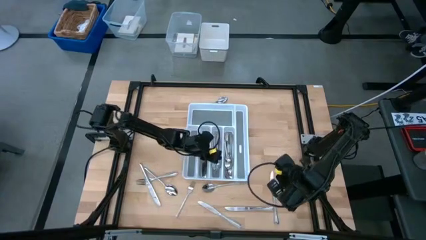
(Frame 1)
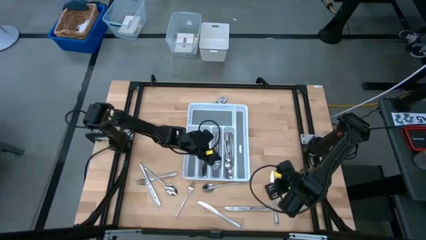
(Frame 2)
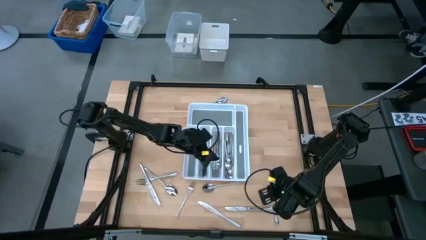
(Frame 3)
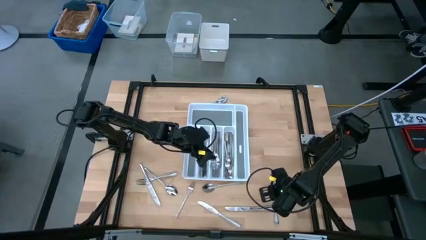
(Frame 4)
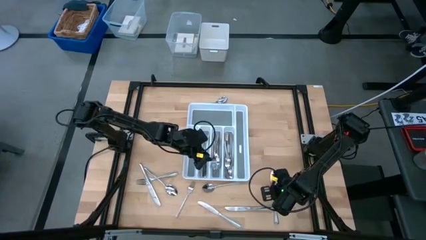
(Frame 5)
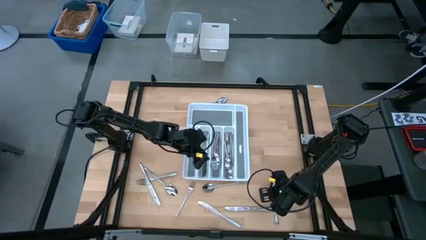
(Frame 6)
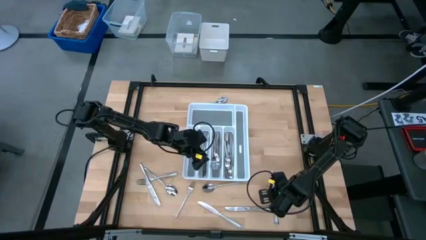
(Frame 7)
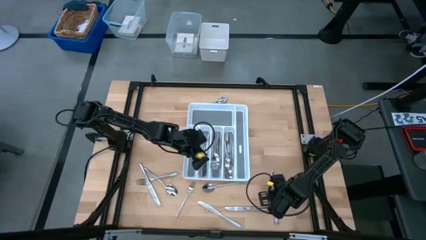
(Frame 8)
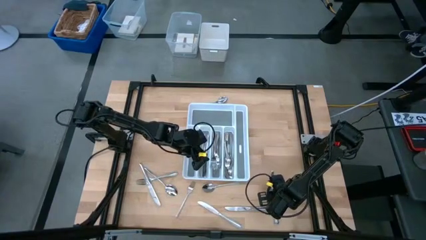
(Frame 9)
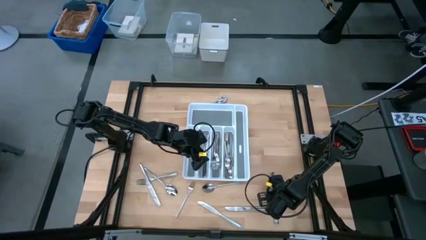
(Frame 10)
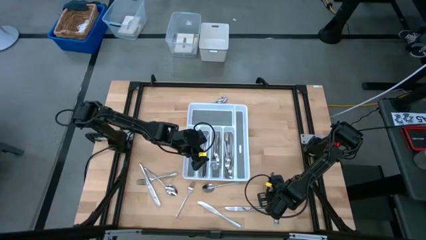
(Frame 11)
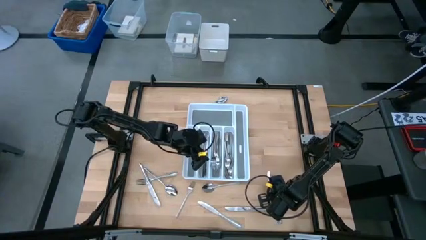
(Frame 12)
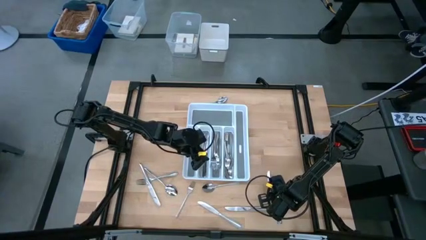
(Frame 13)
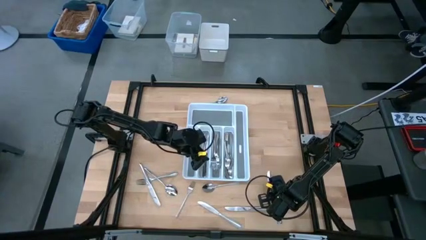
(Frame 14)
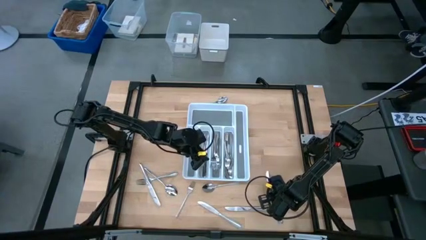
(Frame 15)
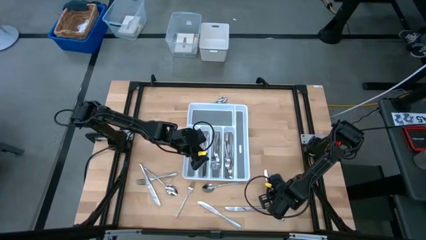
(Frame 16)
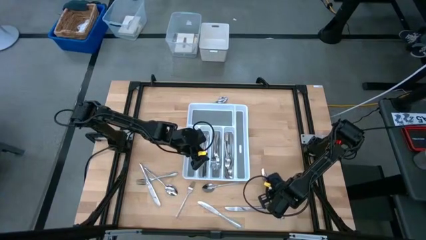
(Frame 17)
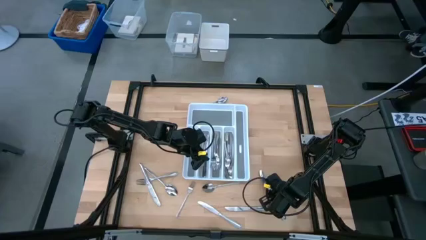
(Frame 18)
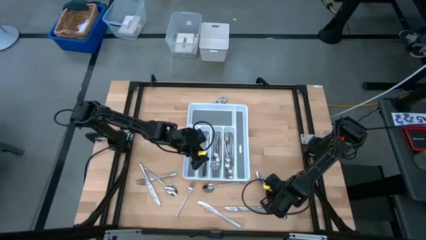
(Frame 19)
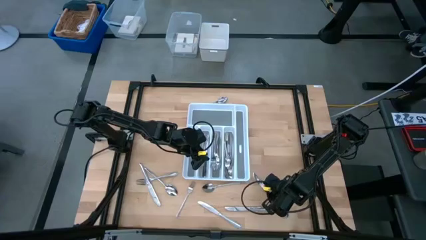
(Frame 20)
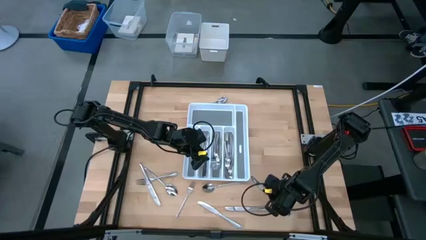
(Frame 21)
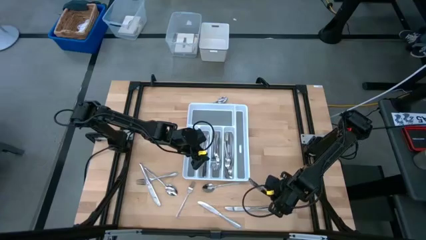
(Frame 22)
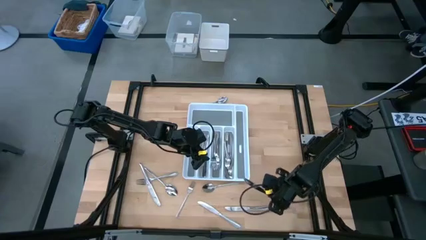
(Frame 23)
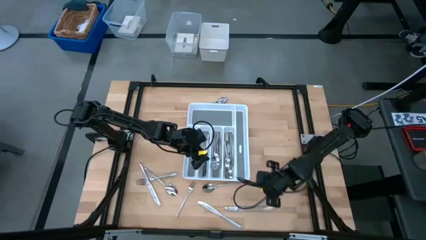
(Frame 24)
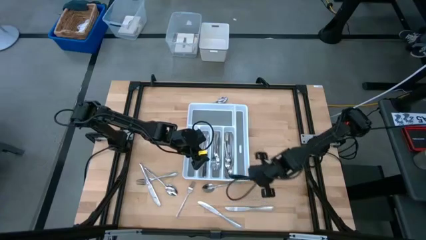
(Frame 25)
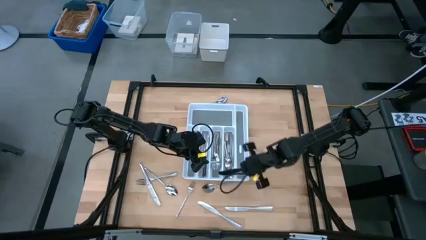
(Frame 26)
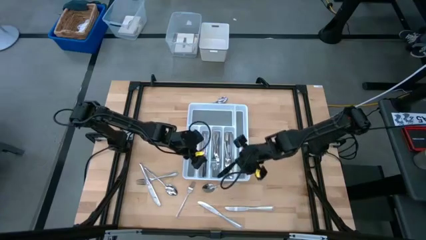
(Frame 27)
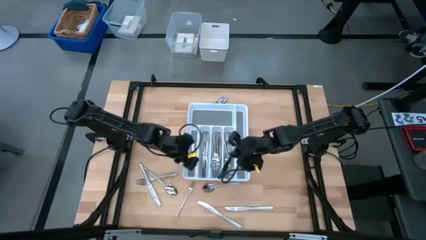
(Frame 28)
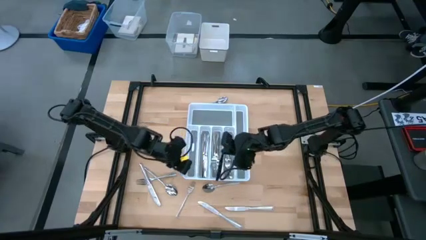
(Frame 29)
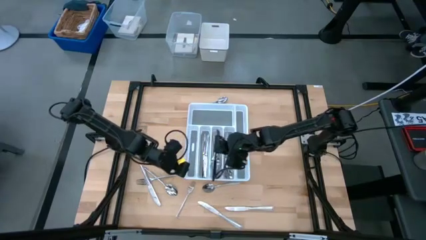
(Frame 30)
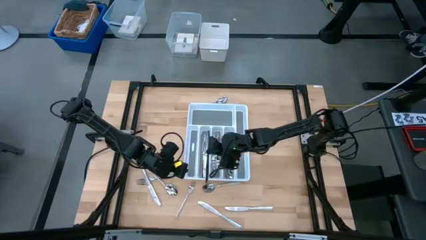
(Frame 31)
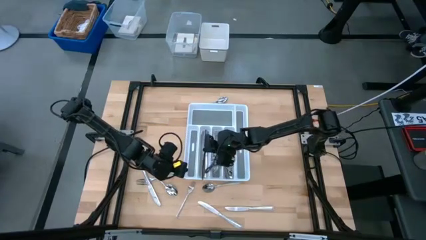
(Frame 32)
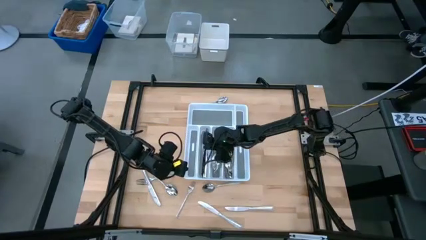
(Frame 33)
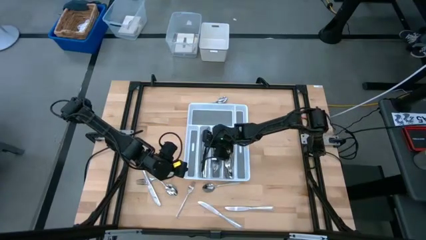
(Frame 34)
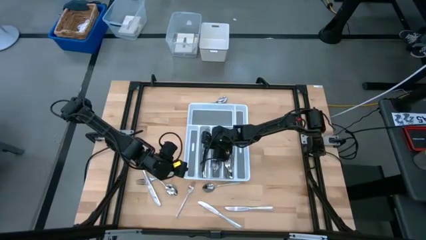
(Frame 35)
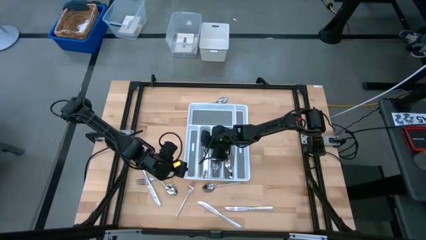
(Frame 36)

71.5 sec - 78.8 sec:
Task: Sort silverware
Put the silver table knife into the white cutlery tray

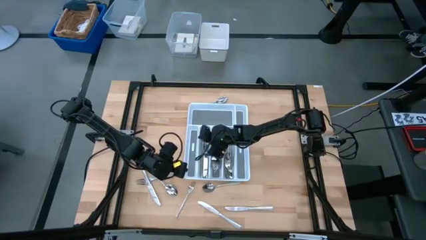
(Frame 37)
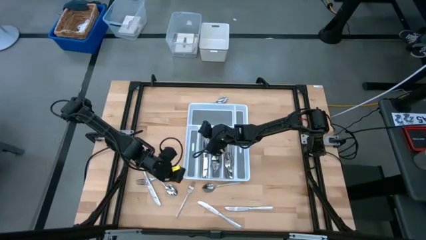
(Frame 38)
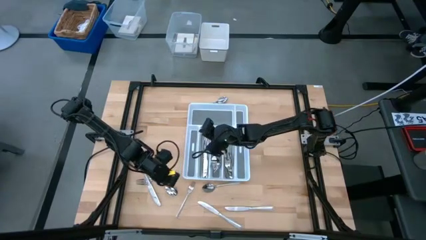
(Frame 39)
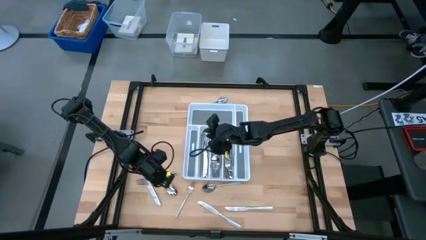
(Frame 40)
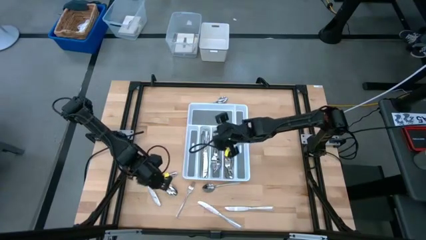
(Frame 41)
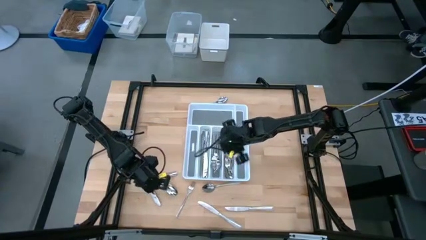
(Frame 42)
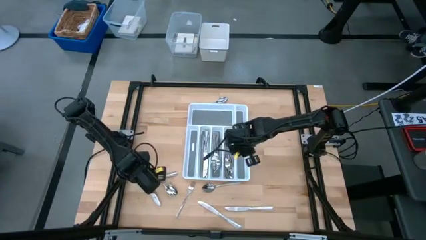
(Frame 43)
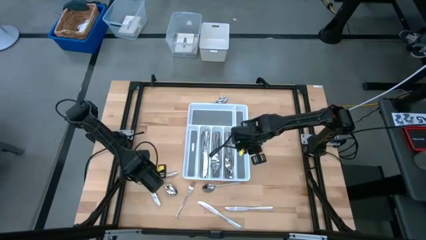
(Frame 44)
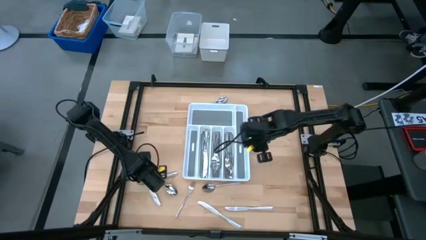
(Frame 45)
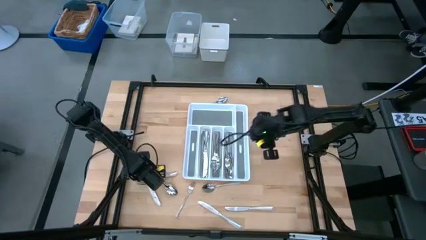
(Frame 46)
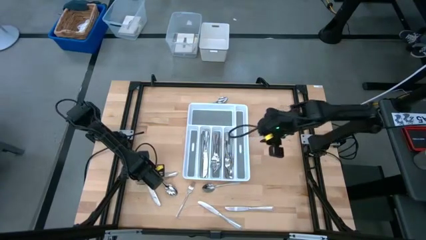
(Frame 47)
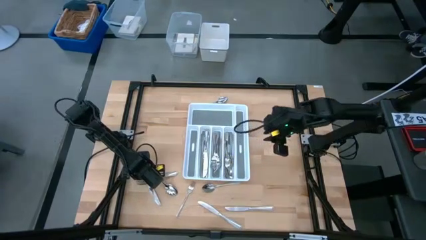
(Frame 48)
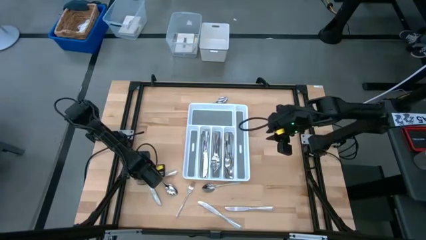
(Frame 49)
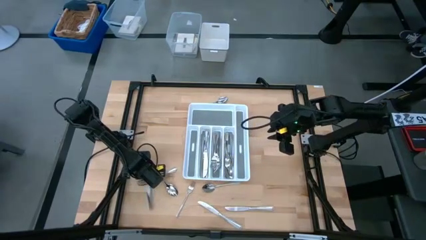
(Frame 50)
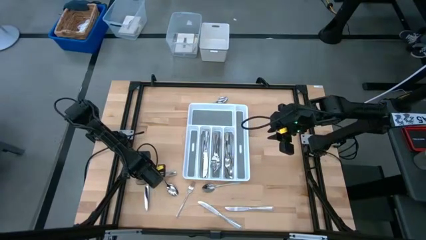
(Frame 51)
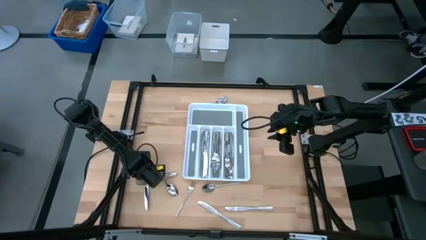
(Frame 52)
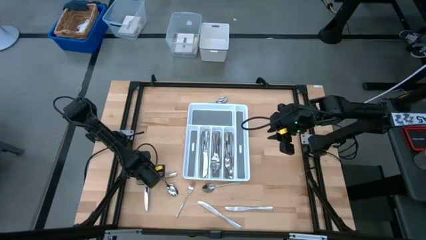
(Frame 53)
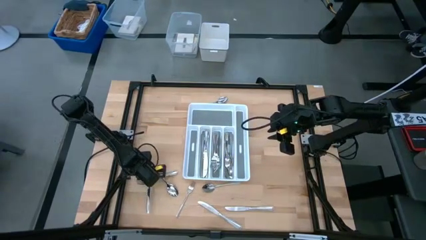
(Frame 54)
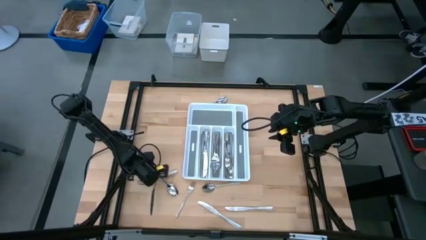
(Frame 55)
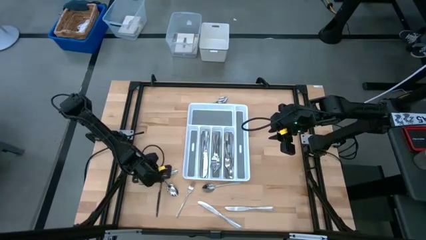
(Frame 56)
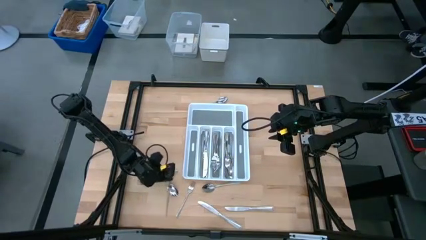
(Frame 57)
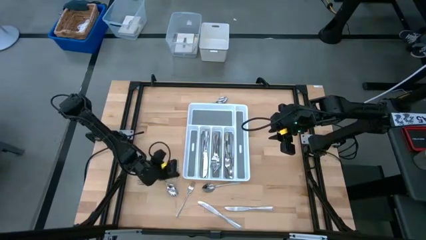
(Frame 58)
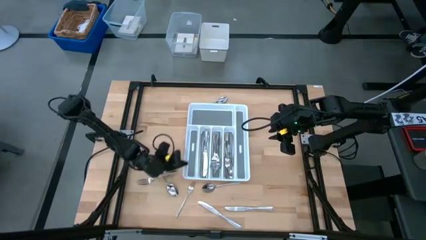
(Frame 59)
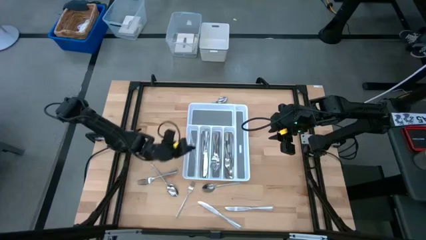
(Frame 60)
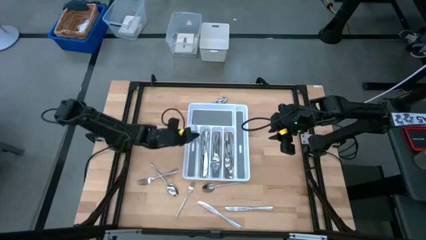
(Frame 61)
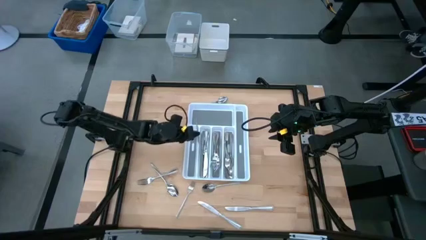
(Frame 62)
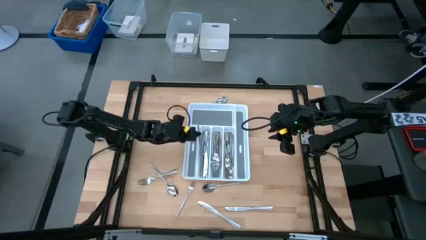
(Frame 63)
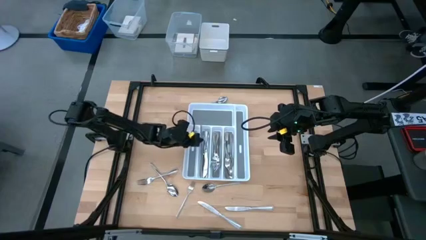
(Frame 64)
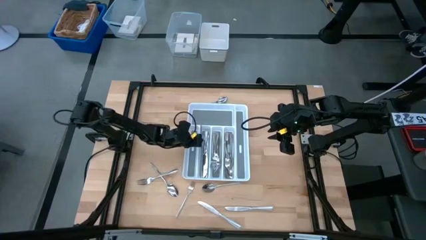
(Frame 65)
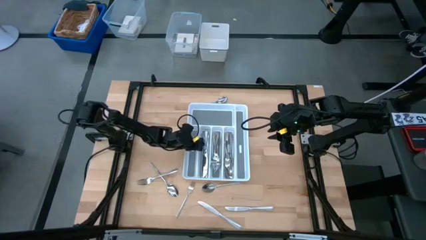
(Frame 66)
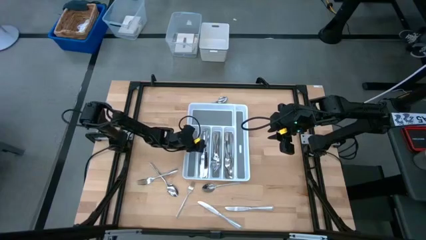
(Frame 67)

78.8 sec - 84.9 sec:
Put the silver table knife into the white cutlery tray

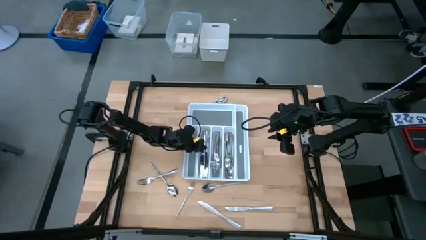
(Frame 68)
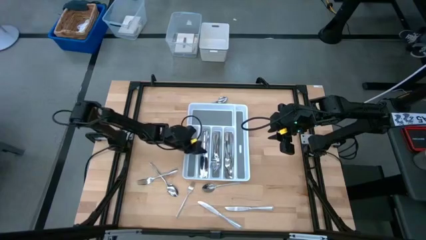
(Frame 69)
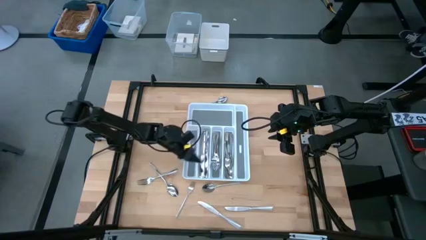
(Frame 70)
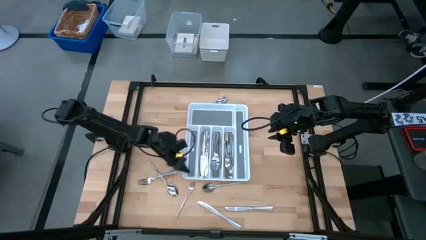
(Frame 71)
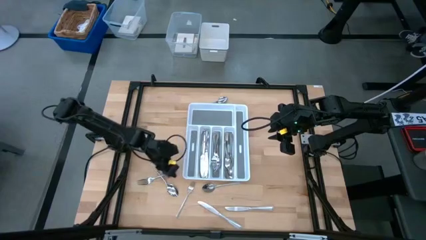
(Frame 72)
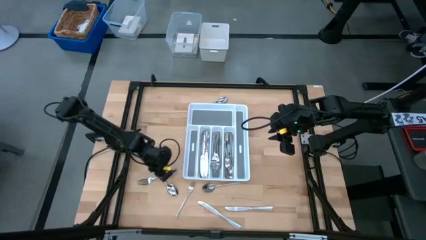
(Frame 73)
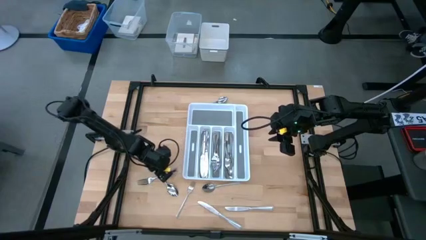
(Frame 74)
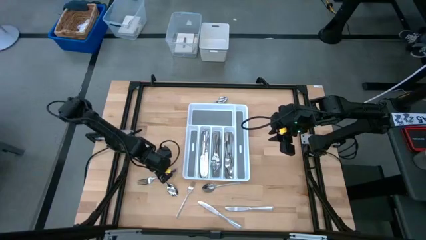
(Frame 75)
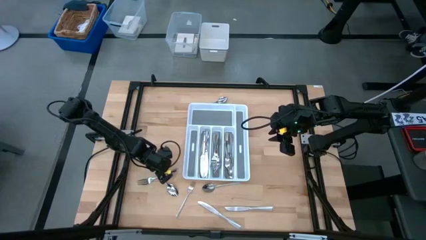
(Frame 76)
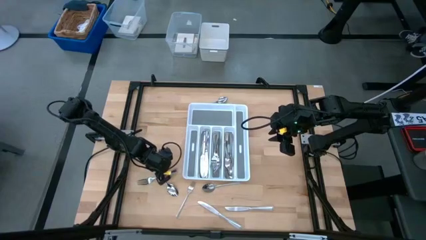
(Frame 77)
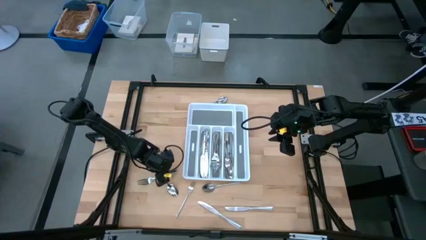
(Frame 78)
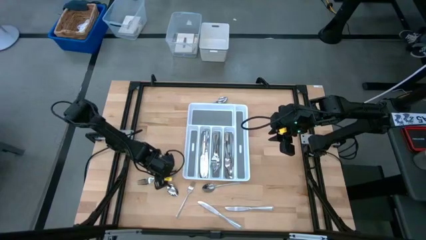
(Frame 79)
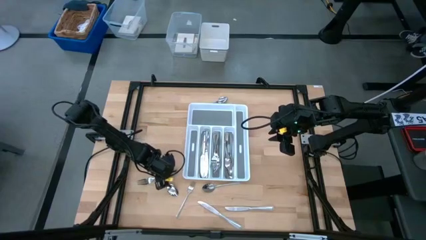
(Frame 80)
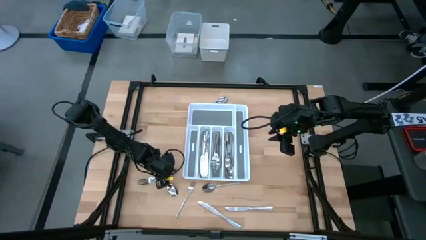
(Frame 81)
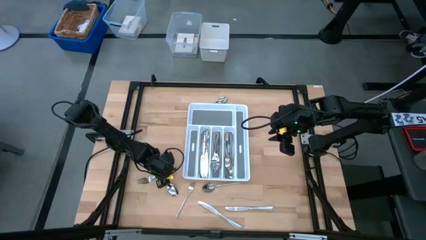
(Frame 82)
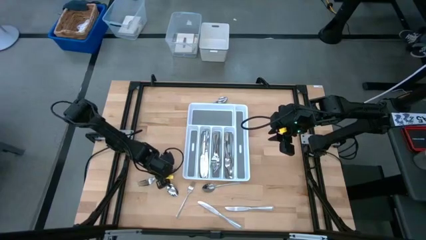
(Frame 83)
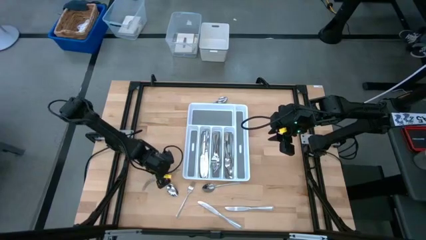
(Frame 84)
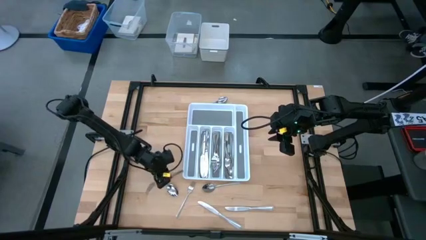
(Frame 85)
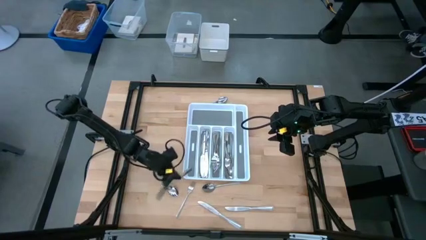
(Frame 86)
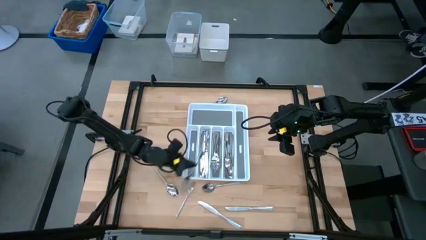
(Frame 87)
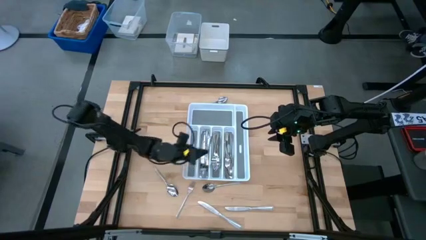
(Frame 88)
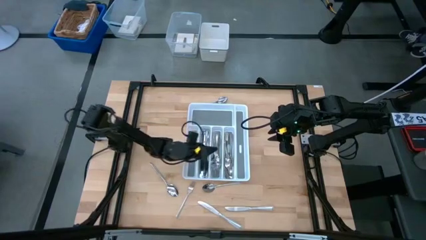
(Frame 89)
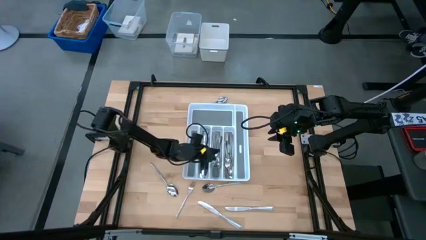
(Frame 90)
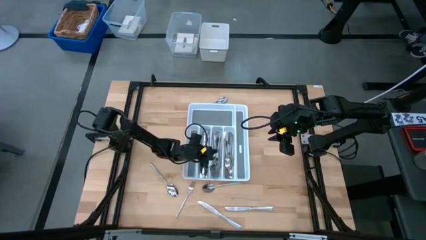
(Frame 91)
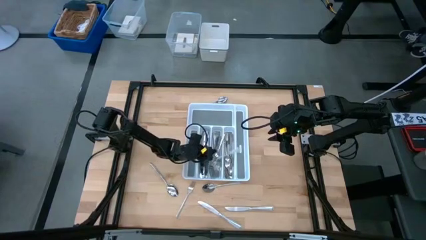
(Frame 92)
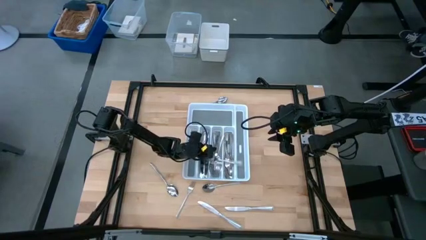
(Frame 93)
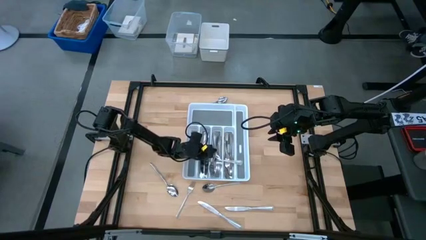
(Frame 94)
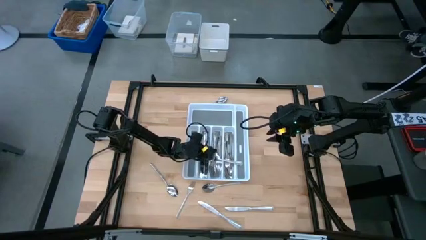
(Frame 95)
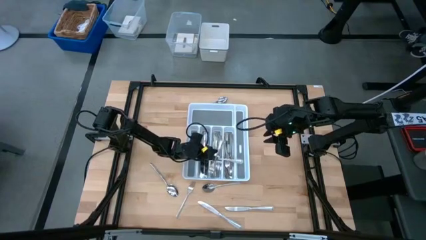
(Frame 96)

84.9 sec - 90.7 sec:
Put the silver fork into the white cutlery tray
